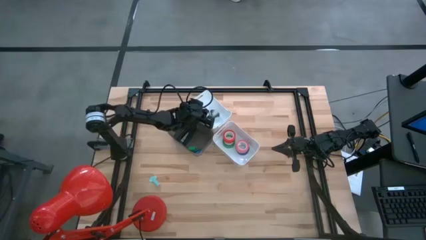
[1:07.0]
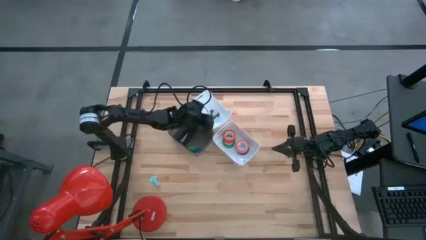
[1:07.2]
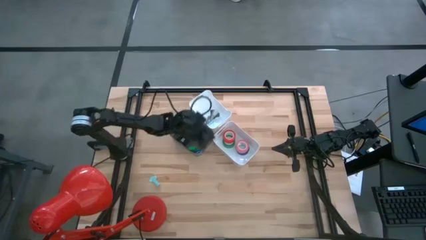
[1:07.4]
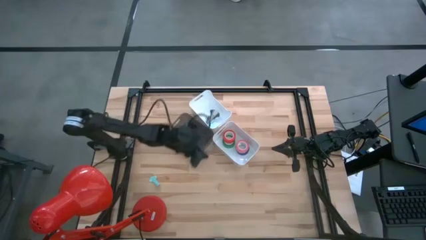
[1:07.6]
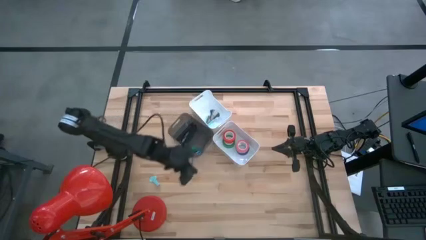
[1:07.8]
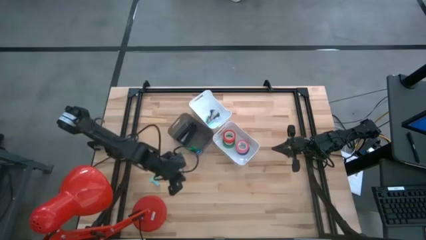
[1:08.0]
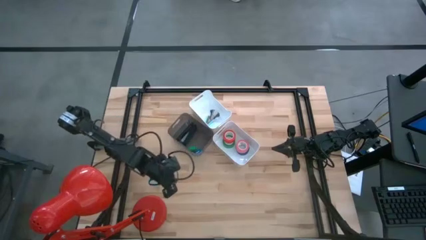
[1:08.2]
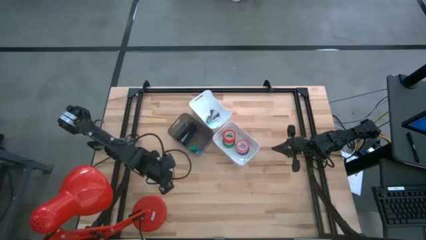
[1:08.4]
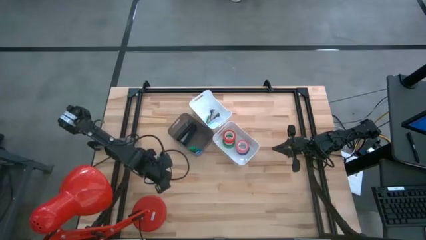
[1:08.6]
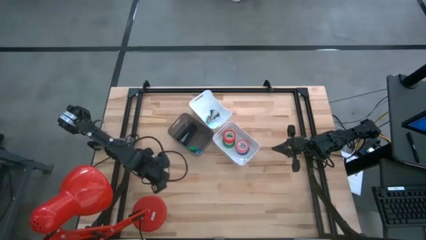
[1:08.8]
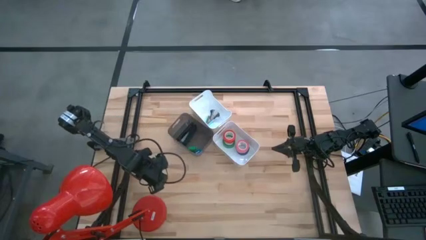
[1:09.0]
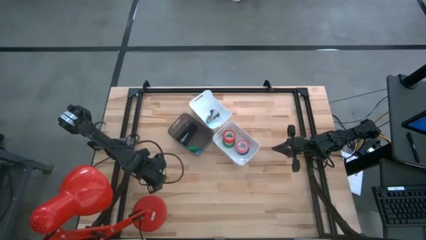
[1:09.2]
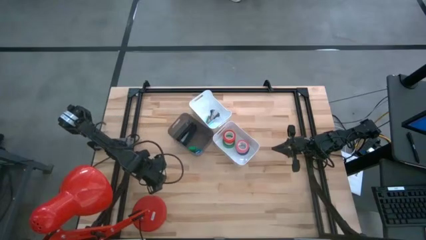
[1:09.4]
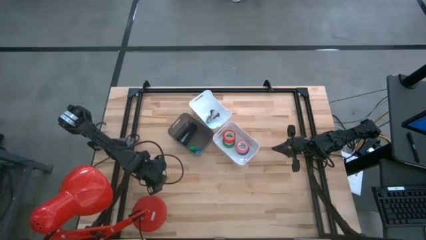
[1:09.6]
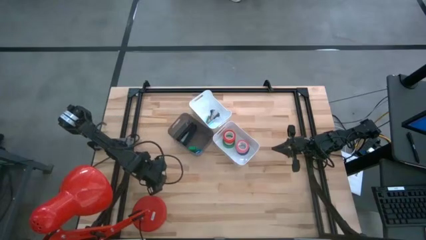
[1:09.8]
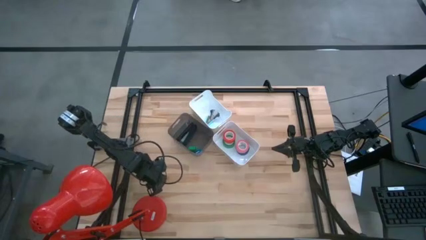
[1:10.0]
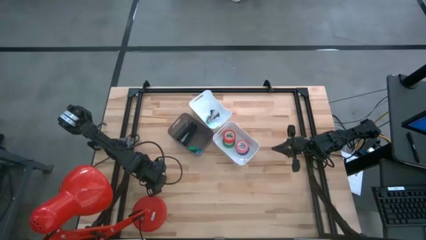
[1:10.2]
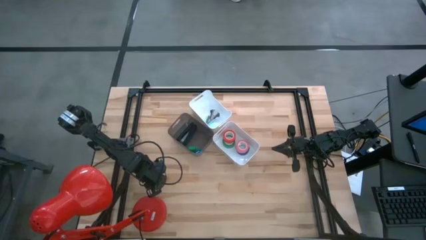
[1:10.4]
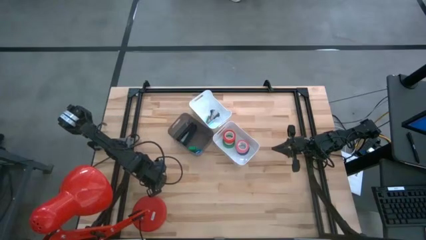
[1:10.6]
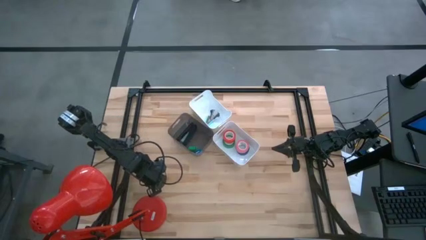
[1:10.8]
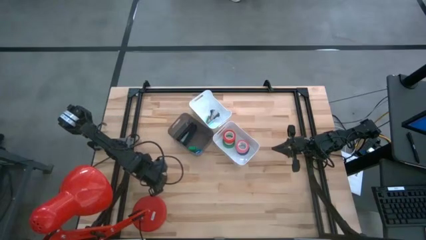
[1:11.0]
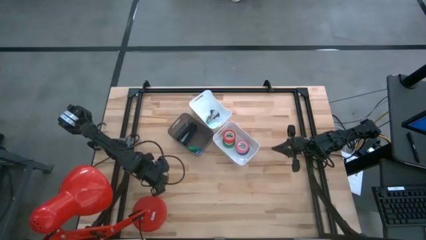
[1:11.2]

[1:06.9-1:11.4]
Task: Pick and place Stapler, Stapler remover, tape
Put the light blue staple remover into the top white bin

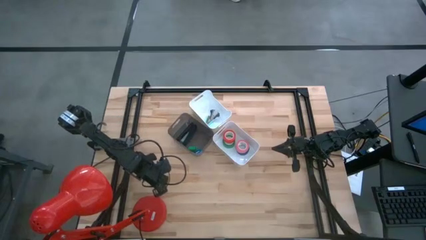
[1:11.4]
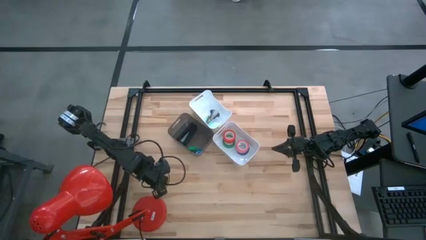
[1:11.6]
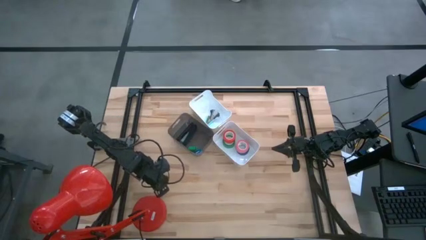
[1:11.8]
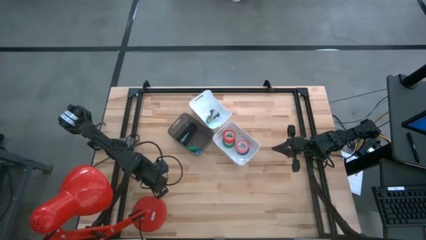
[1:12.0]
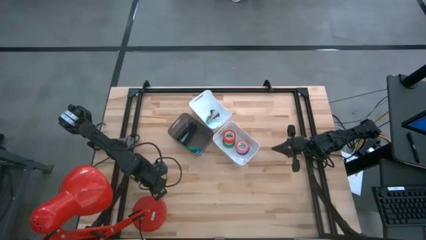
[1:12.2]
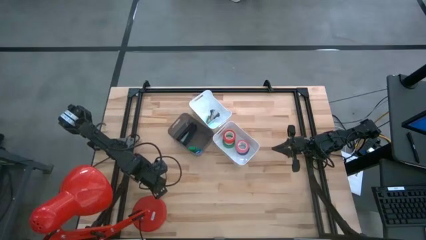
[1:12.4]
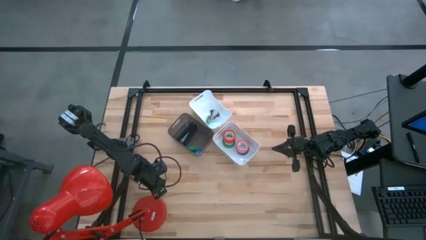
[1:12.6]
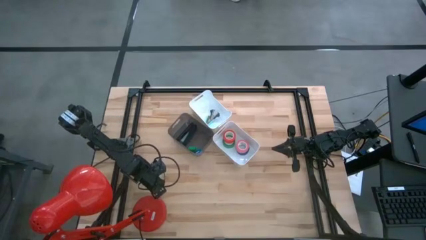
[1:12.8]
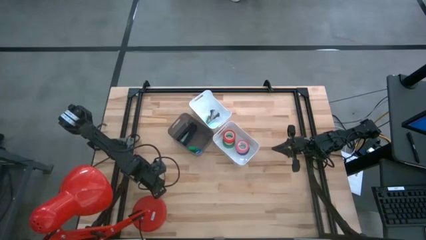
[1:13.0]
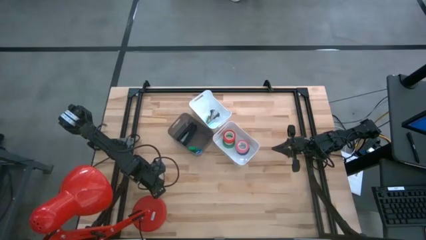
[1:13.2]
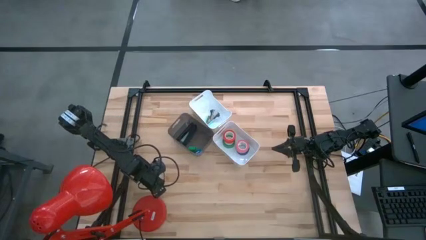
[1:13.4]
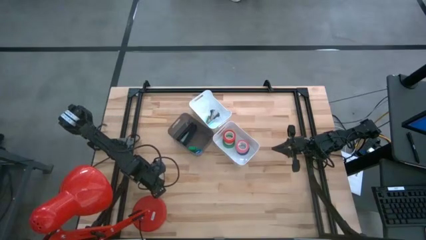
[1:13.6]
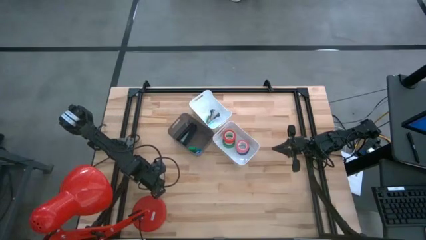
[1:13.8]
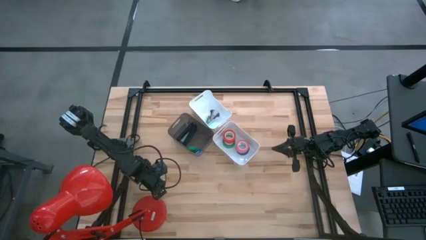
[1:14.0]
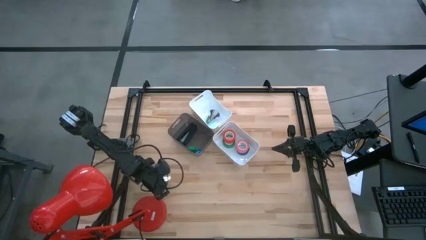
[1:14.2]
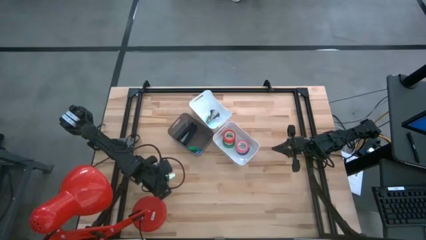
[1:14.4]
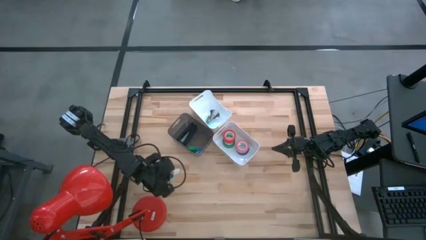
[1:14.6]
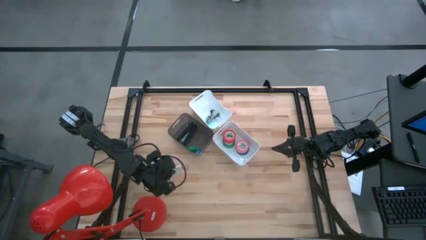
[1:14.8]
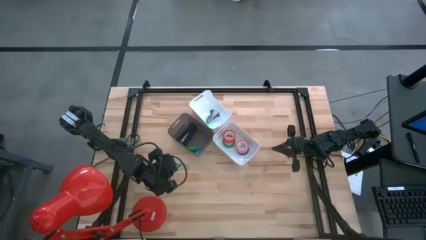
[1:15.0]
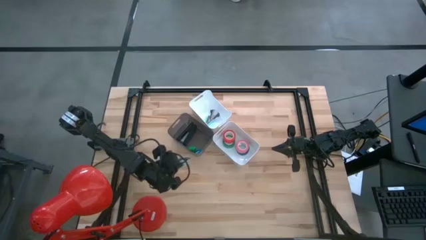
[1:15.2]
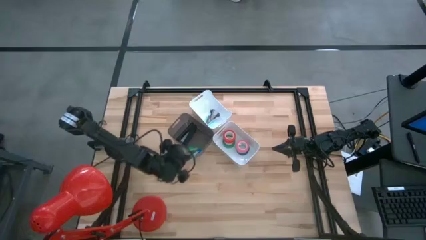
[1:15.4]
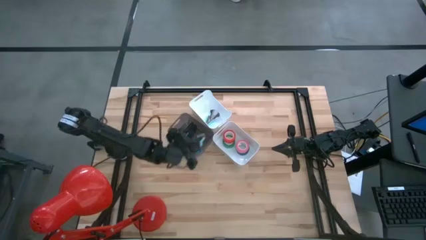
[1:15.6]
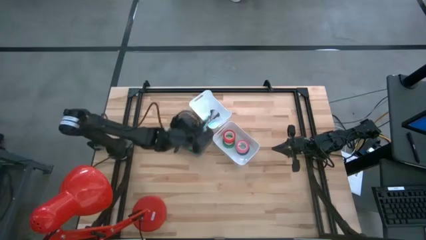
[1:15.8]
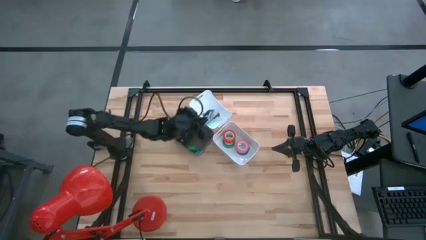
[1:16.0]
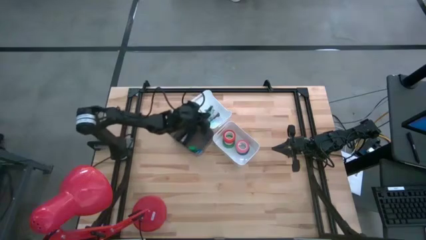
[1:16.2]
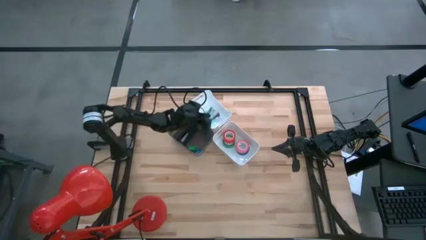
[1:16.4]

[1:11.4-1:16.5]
Put the light blue staple remover into the top white bin

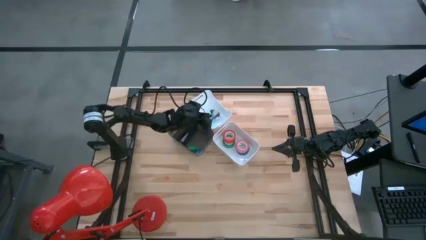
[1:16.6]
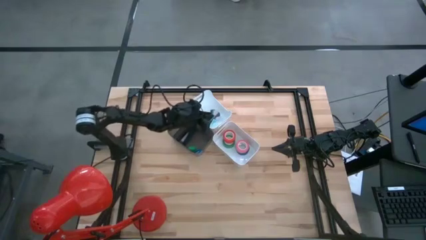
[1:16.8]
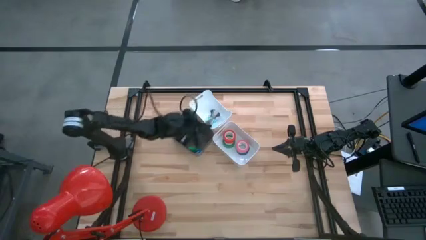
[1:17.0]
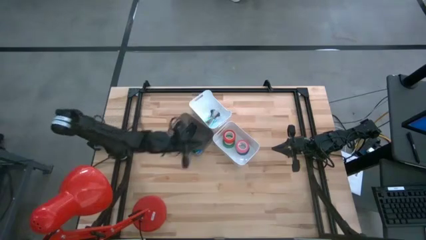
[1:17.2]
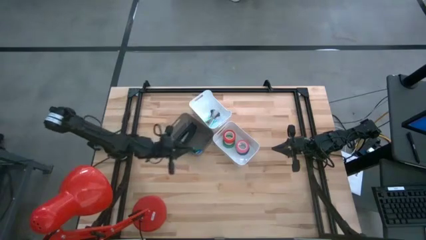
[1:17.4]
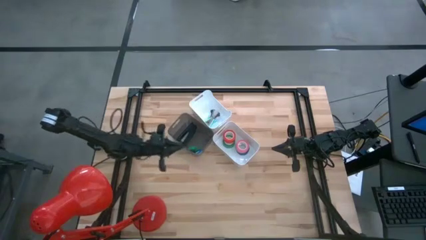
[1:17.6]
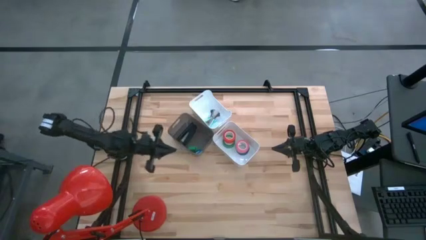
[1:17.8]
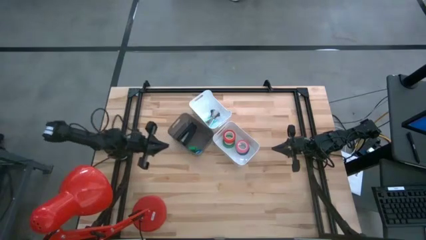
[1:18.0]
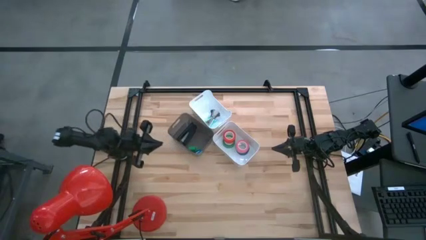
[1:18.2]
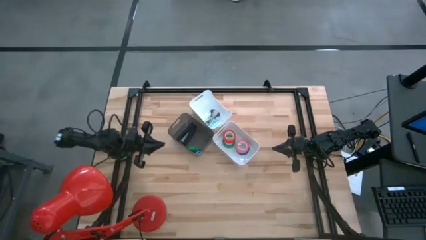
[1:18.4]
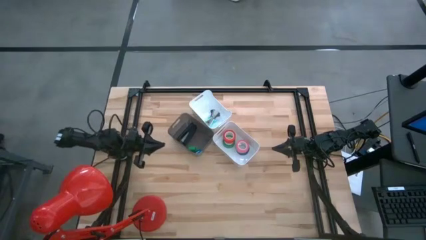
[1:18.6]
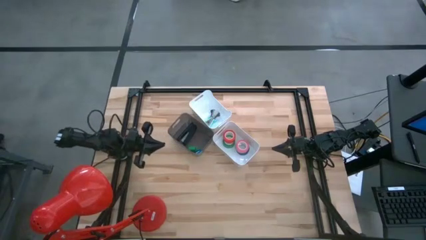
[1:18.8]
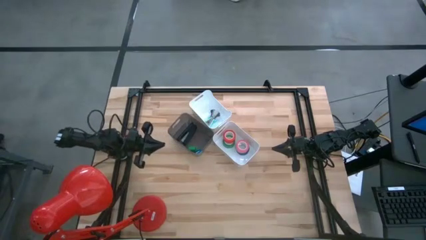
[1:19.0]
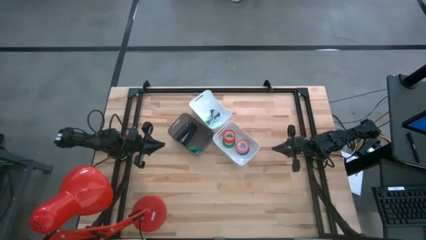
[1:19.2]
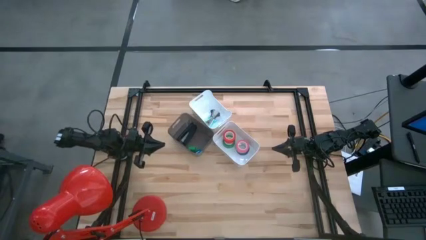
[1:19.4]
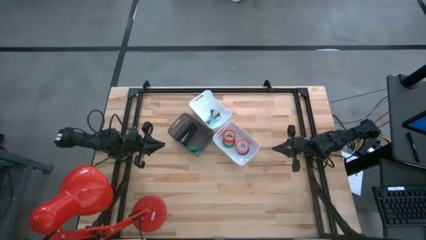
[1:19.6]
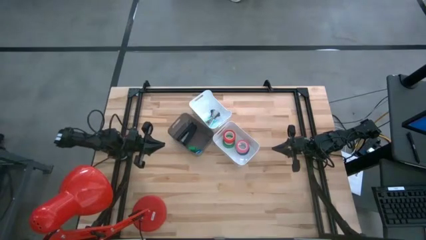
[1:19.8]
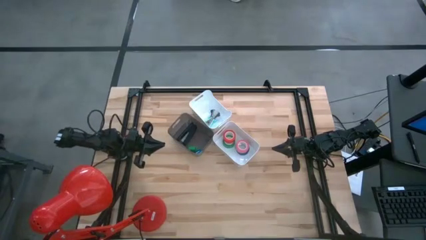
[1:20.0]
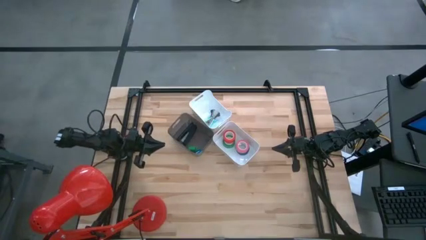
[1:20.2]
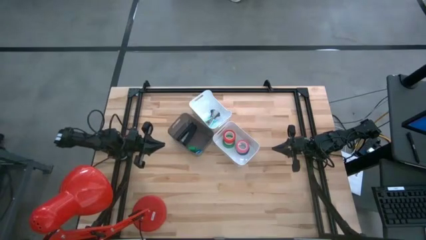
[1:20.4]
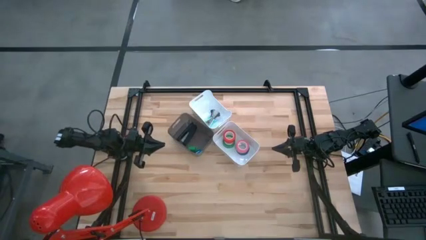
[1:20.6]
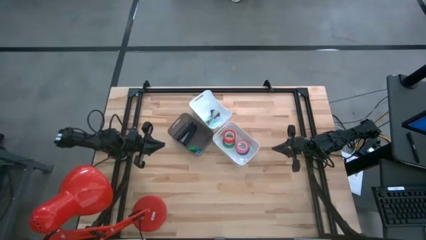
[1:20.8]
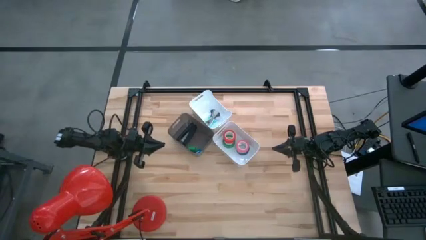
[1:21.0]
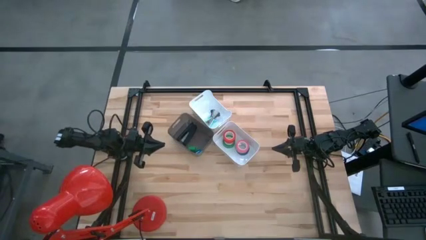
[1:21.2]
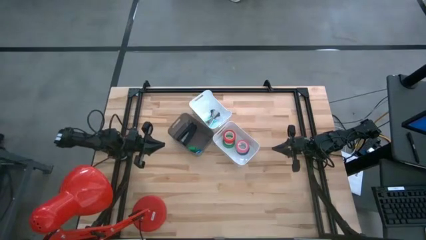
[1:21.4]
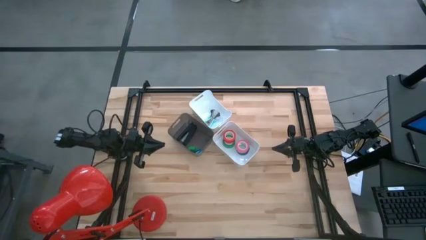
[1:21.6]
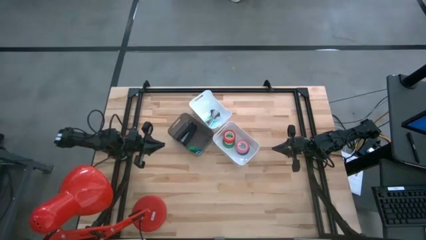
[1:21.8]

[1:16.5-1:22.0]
Return to Home Position

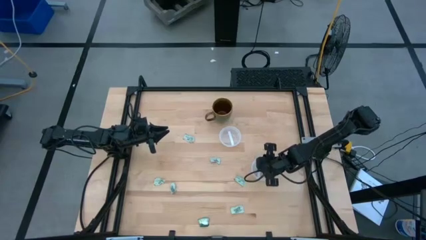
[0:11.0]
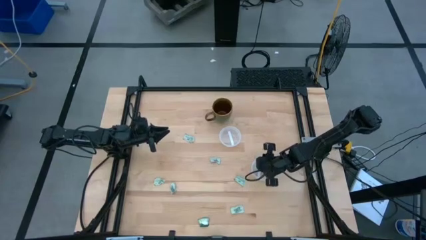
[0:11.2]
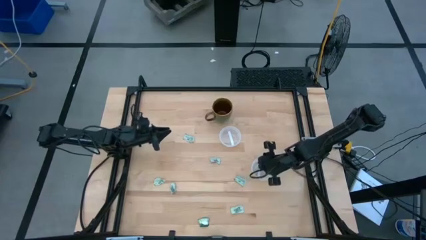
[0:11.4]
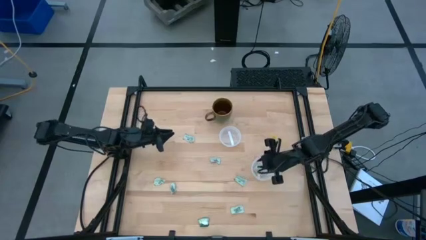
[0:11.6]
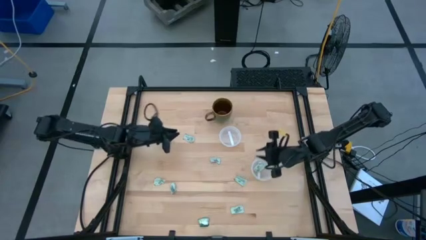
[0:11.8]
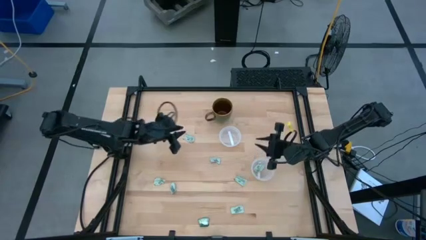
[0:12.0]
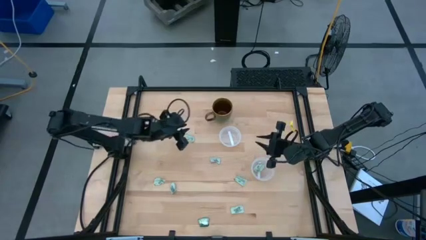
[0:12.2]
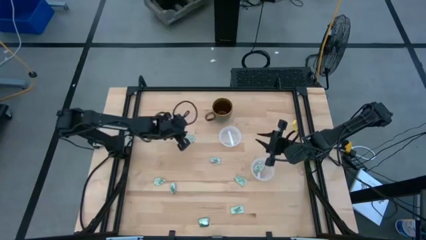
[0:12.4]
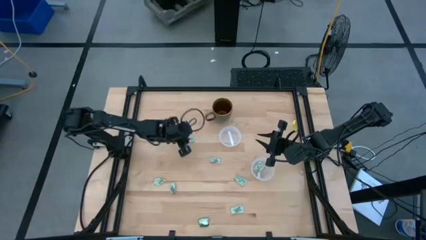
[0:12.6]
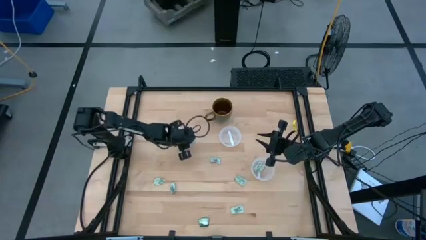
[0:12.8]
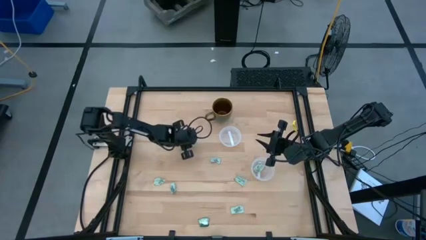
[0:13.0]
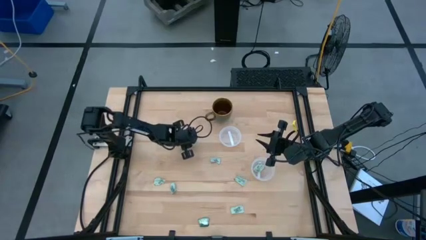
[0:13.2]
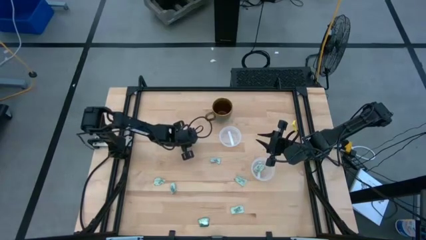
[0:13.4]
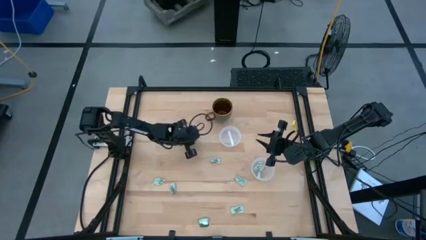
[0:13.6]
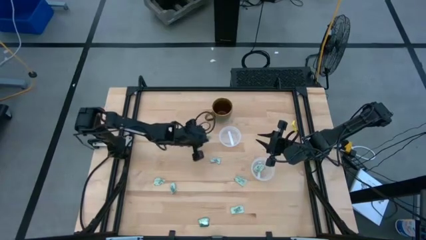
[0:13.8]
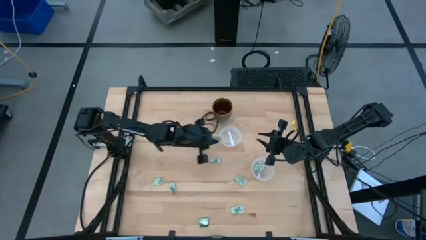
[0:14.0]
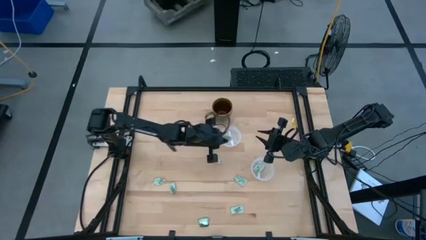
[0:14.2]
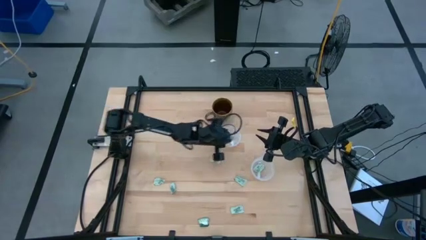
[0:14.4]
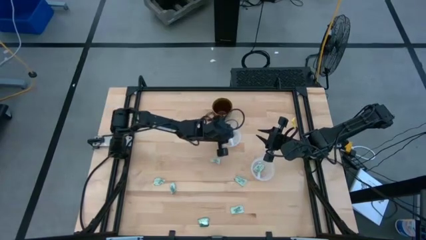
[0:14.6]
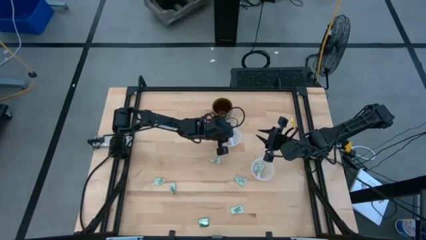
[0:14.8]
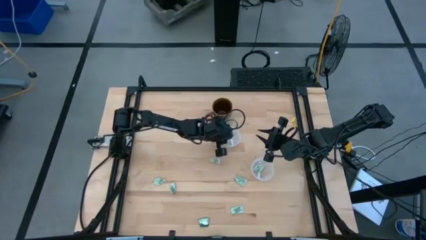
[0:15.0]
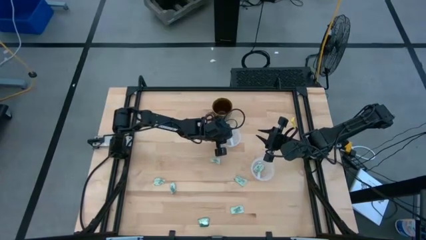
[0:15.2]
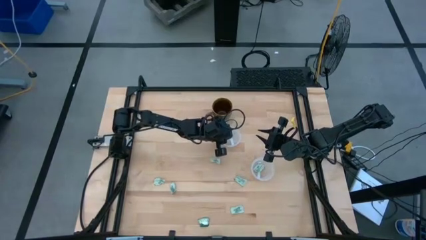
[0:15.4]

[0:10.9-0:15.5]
Task: Pick and place items into bin
Put the stevia packet into the top transparent bin
